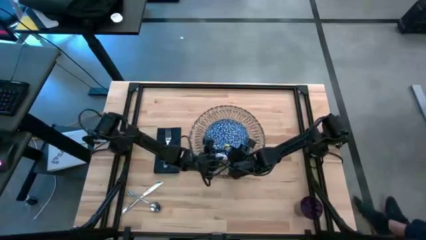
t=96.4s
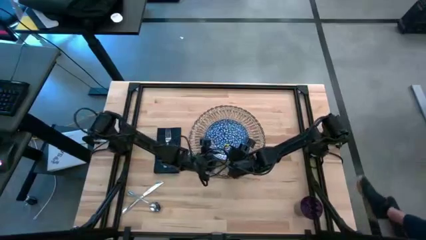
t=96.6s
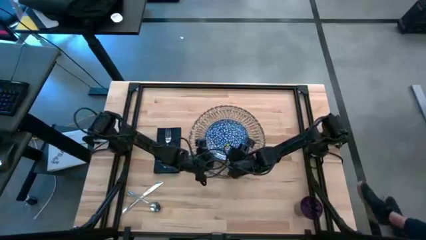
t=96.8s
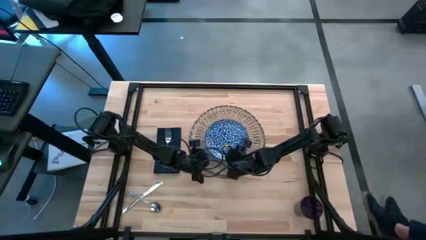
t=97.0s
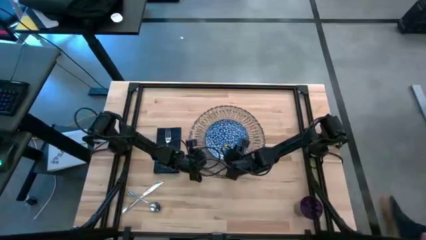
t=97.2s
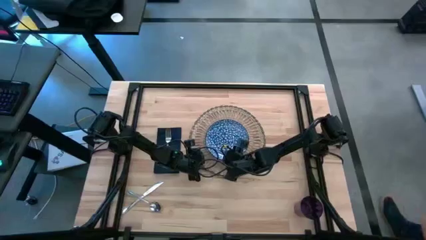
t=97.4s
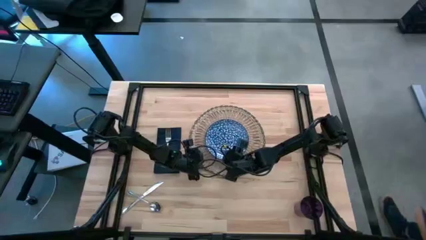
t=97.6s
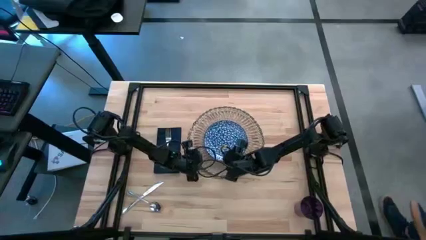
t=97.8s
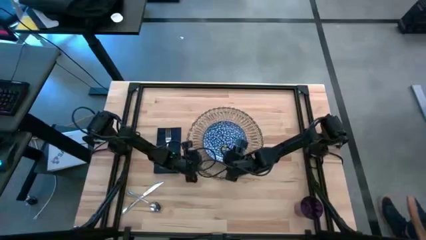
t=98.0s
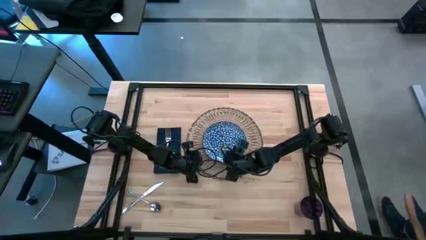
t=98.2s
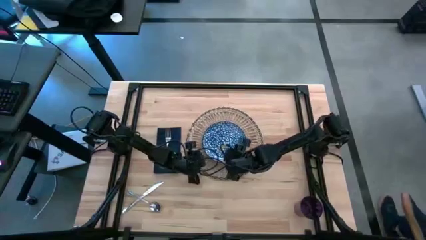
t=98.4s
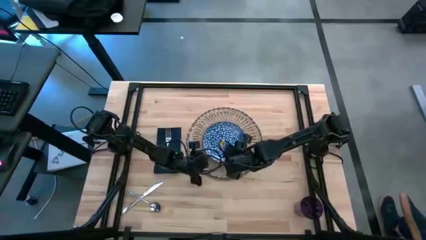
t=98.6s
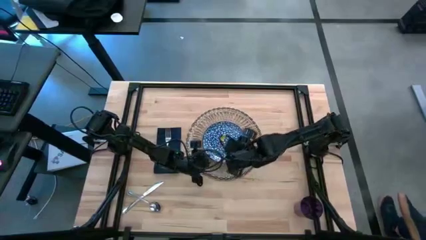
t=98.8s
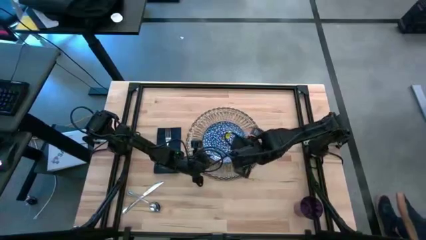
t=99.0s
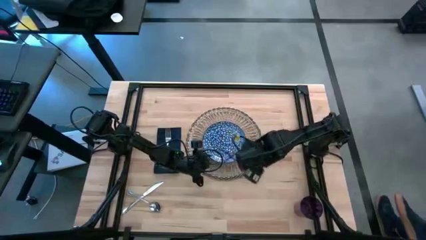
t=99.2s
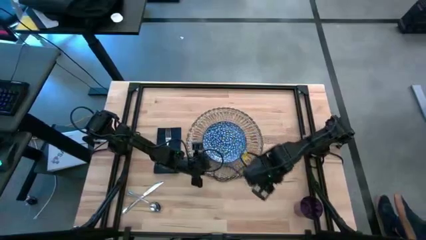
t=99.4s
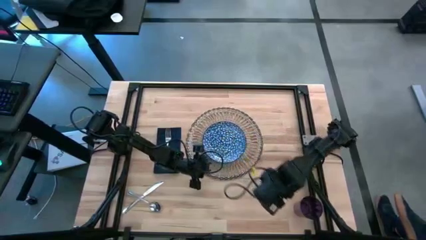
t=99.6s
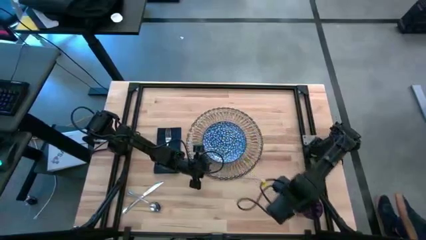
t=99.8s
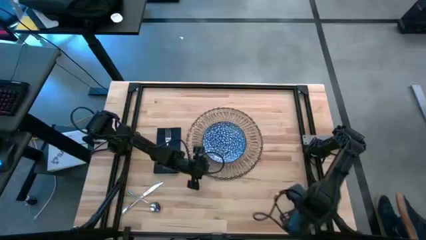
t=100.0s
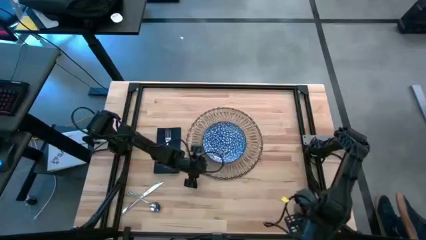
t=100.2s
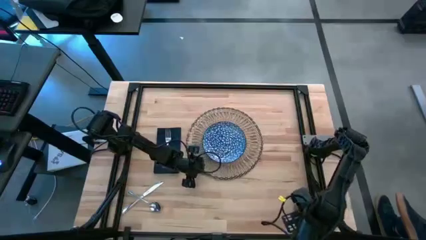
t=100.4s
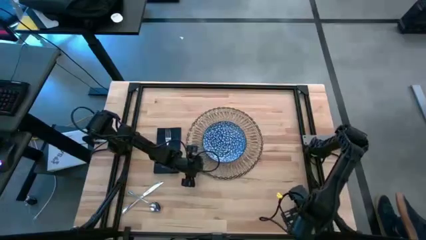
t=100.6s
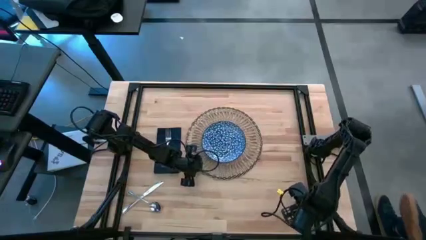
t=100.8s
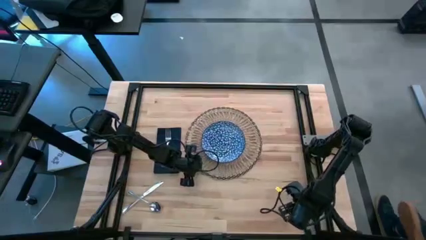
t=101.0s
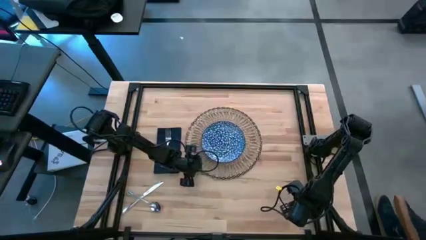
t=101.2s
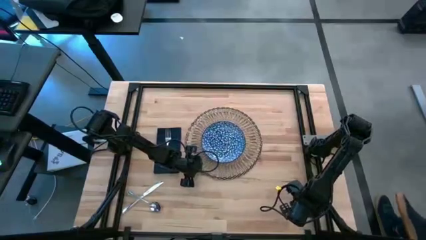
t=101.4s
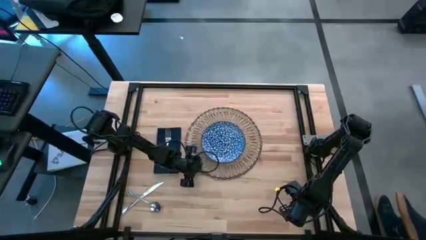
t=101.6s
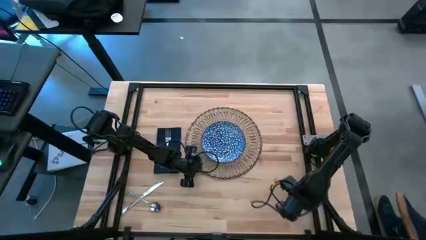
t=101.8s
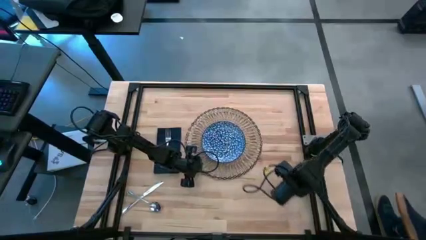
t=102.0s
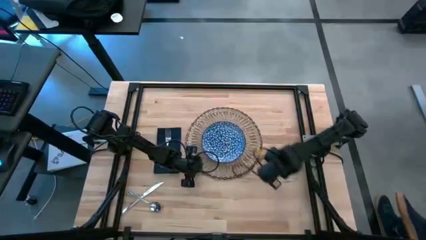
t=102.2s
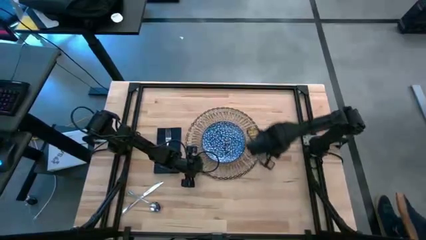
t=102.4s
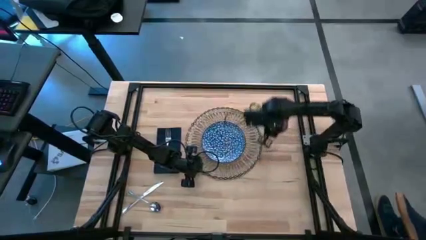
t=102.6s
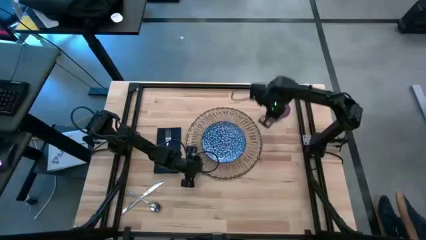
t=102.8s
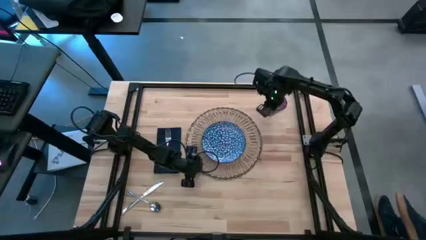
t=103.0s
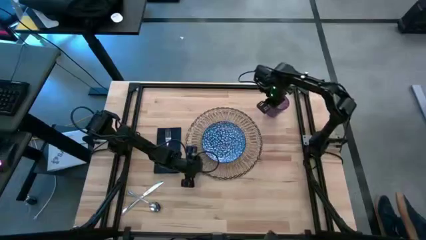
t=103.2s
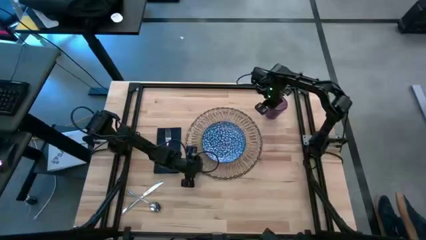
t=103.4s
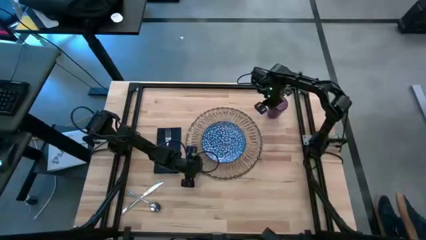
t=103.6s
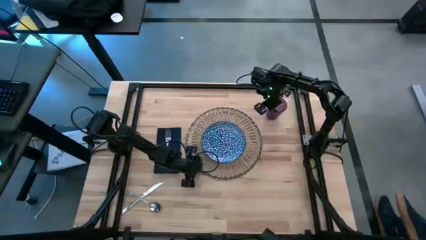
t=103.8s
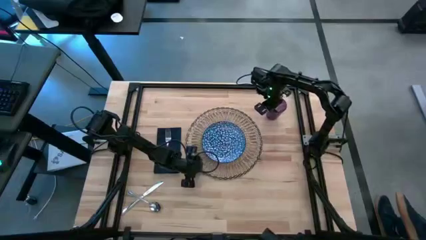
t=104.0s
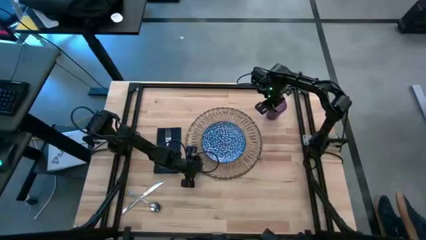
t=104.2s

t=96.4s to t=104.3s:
Task: Set table place
Put the violet cup to the top right of the brown placemat

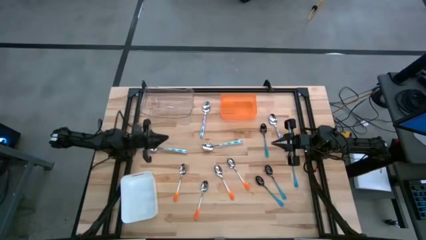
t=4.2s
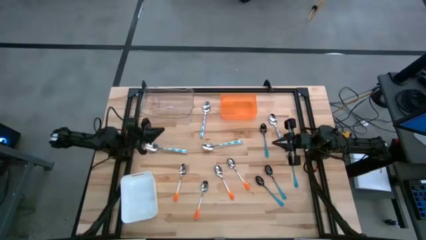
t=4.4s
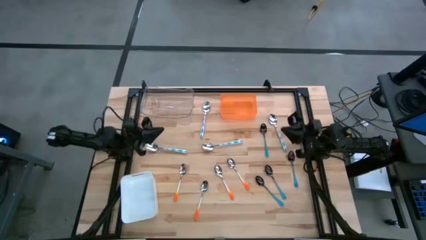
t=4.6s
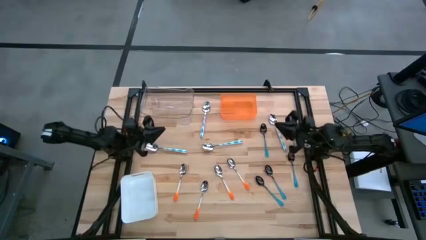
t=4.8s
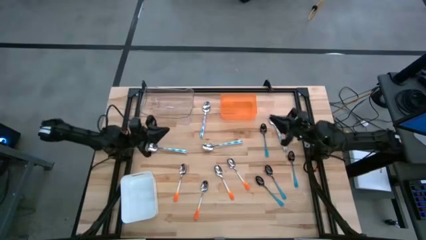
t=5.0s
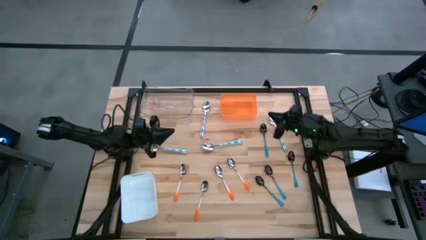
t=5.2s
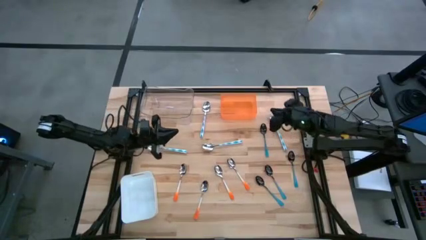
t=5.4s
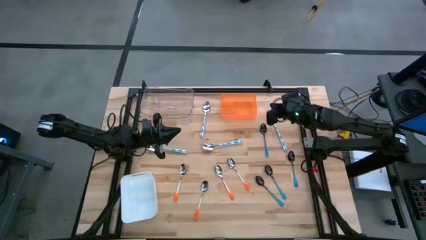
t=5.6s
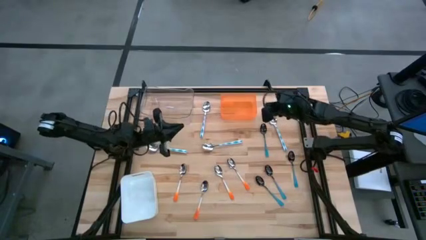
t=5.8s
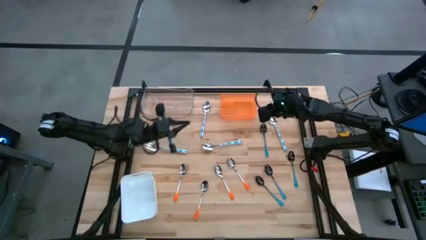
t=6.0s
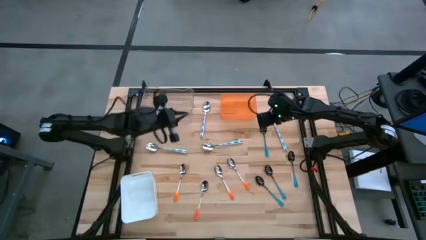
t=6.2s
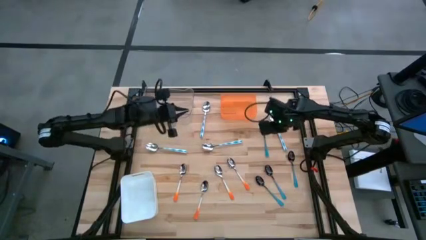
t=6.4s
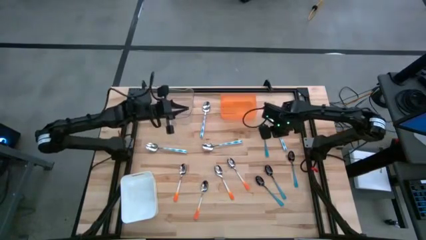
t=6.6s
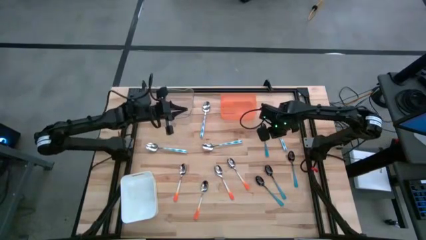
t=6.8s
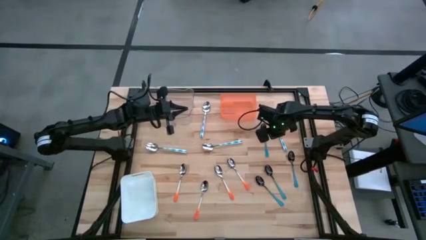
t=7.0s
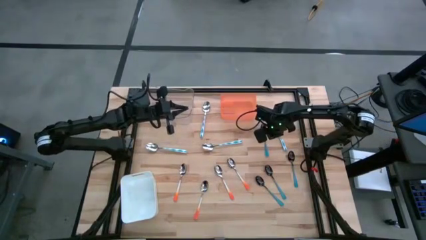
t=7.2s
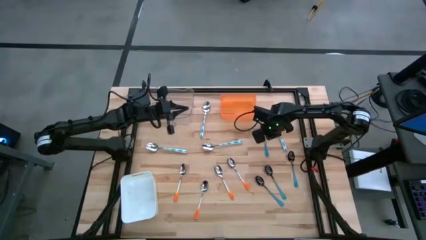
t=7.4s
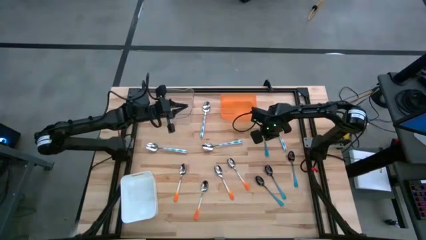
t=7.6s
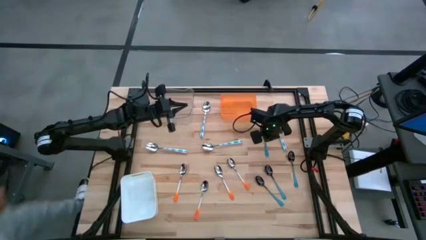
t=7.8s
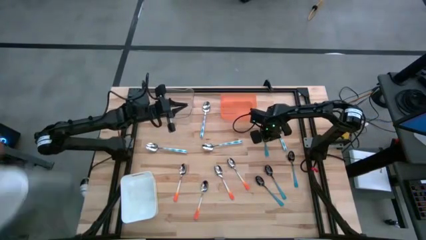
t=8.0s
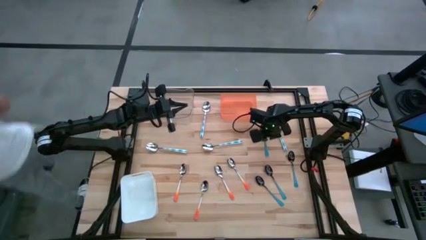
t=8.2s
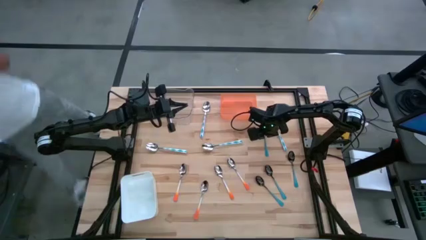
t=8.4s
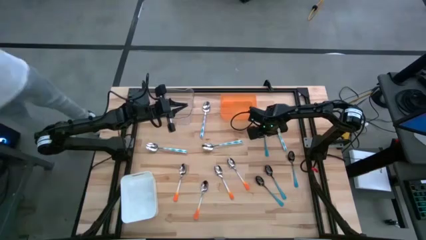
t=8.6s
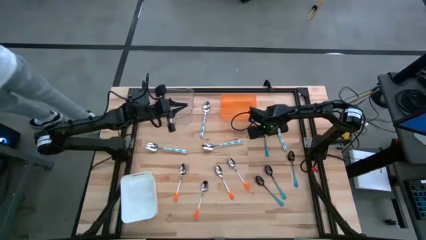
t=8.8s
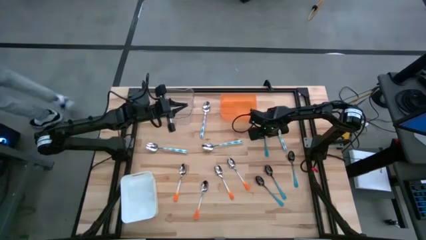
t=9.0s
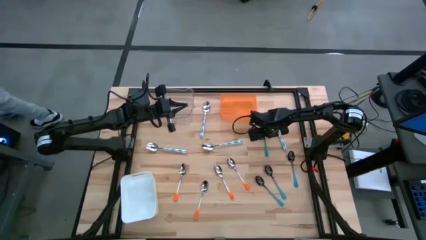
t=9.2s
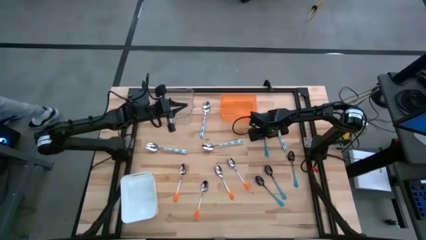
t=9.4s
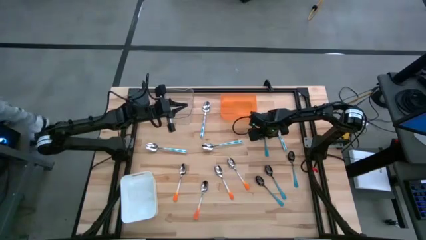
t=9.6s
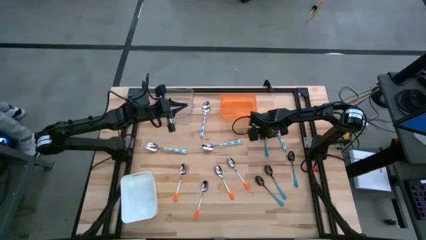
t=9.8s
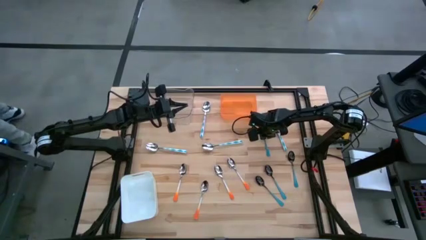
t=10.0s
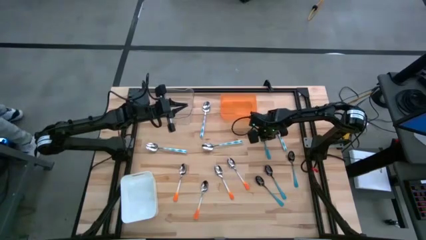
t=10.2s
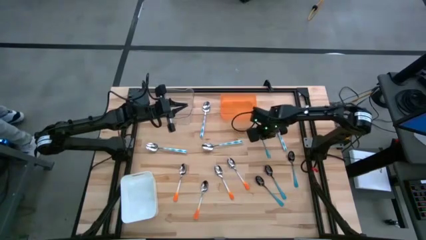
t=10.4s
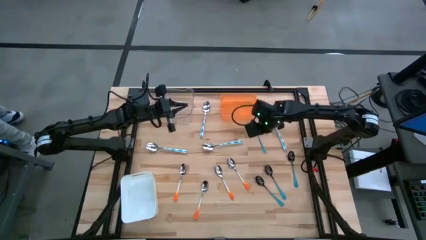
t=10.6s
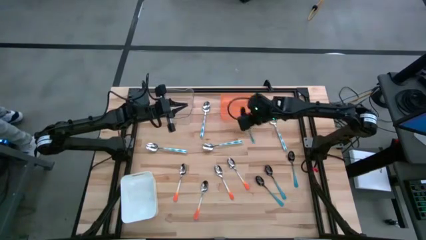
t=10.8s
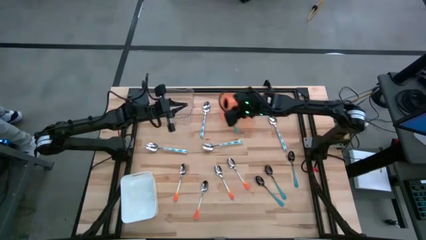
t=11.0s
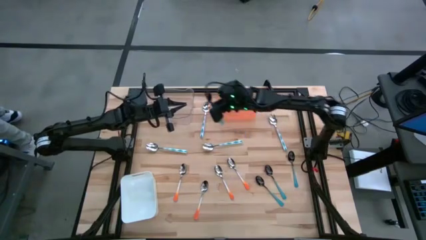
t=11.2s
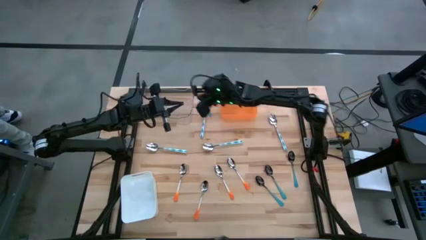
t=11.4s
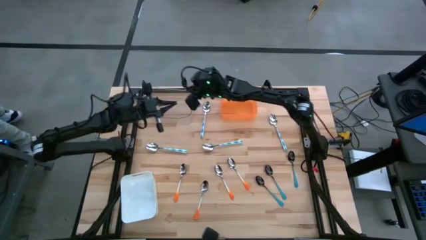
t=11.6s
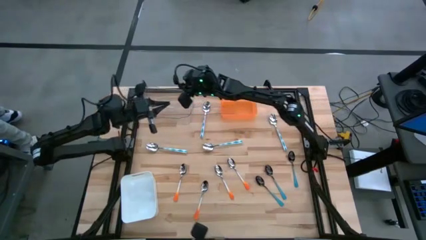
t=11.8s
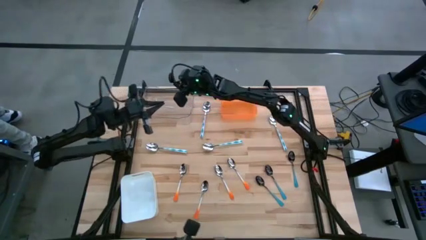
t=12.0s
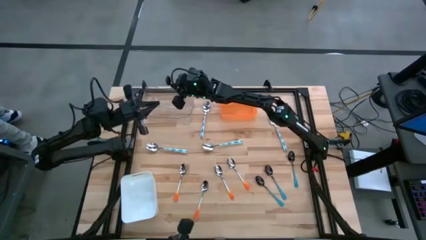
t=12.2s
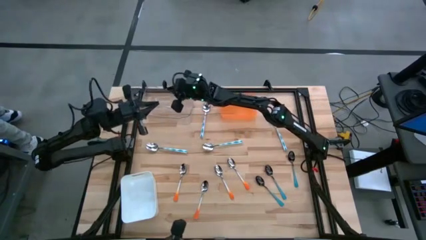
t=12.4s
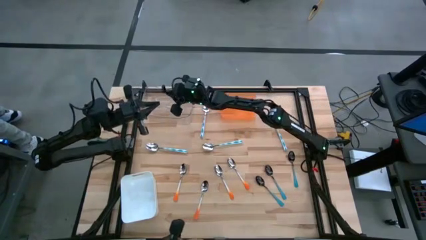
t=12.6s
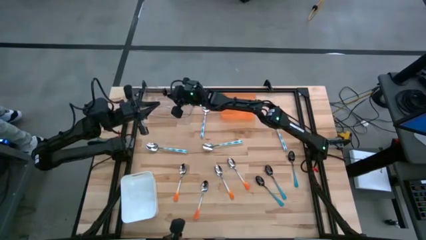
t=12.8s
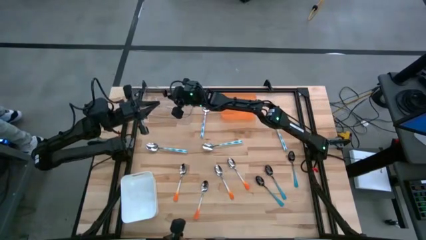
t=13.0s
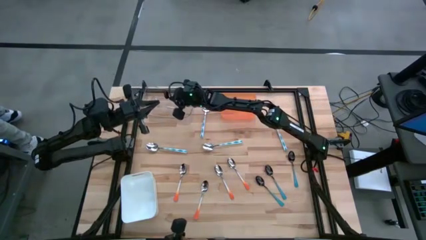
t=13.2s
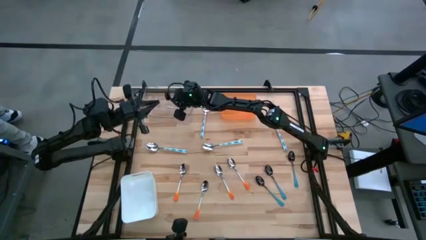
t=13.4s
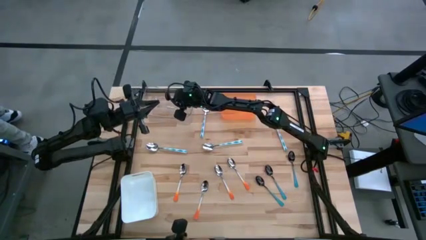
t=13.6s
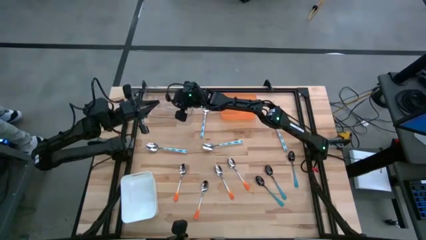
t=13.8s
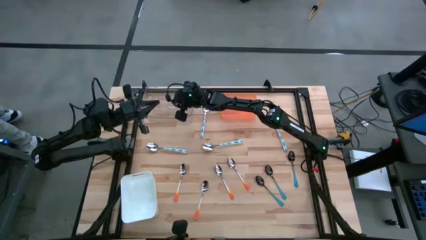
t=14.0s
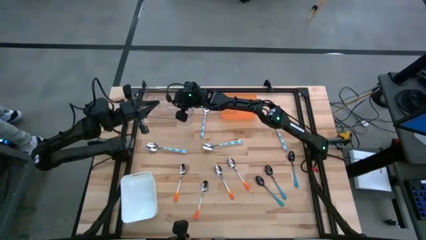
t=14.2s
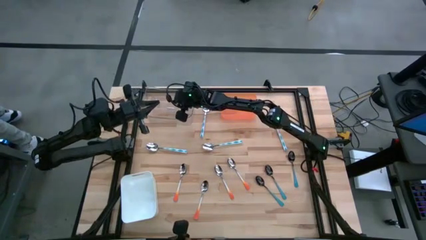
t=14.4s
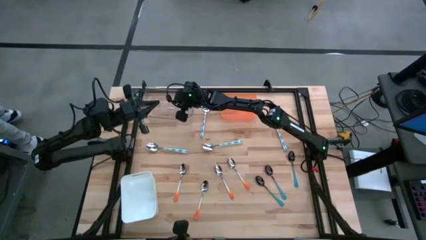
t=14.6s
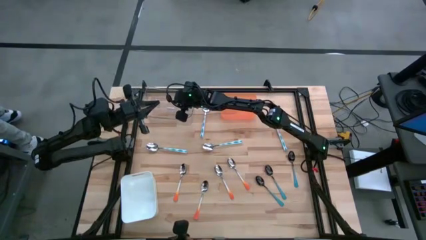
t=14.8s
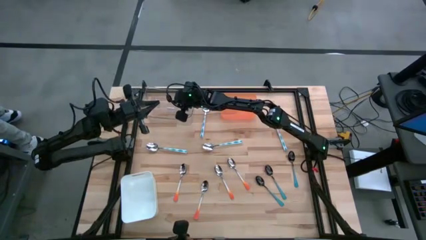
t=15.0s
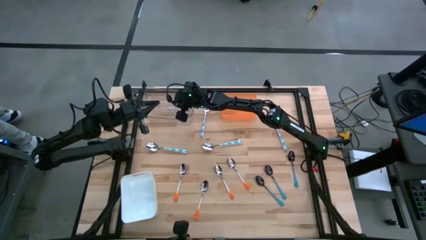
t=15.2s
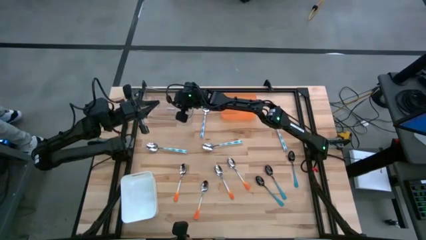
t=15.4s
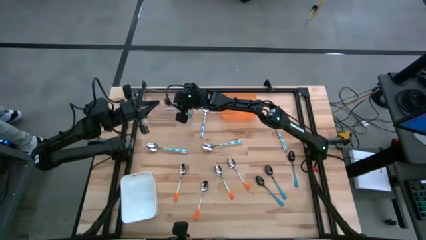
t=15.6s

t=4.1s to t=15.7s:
Task: Sort silverware by color (type)
Put the blue spoon into the transparent bin
